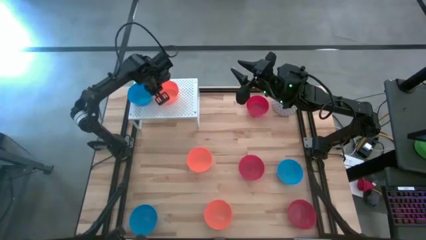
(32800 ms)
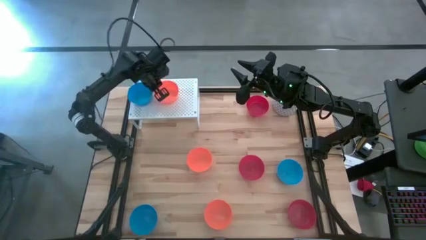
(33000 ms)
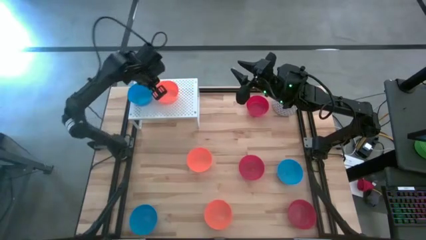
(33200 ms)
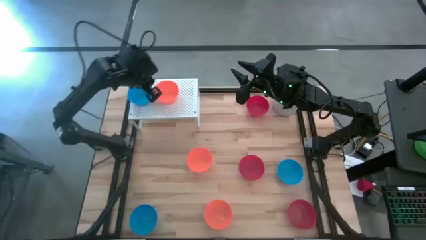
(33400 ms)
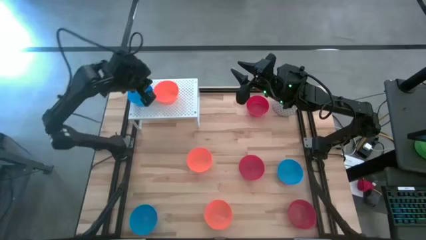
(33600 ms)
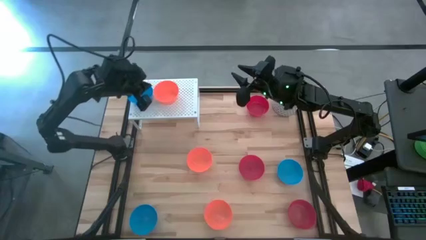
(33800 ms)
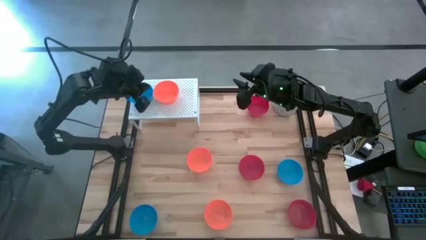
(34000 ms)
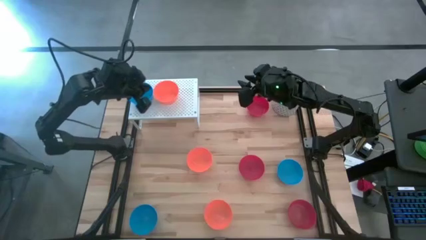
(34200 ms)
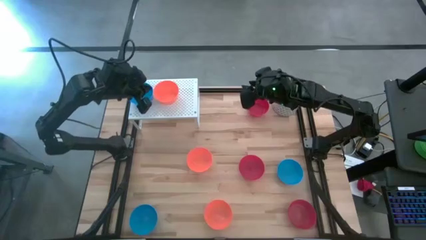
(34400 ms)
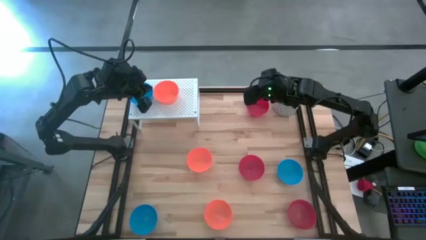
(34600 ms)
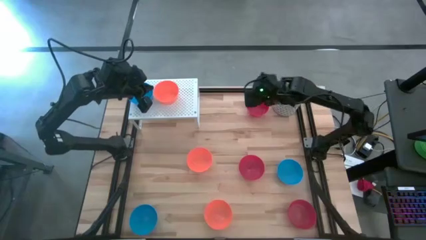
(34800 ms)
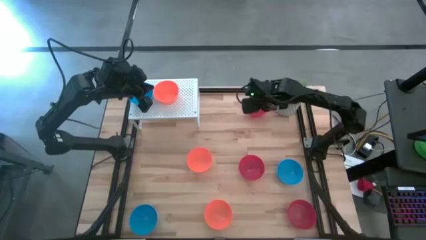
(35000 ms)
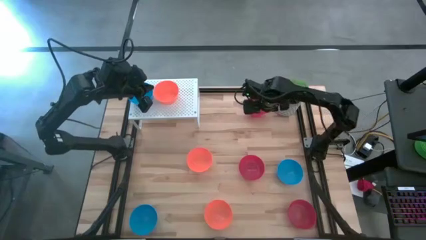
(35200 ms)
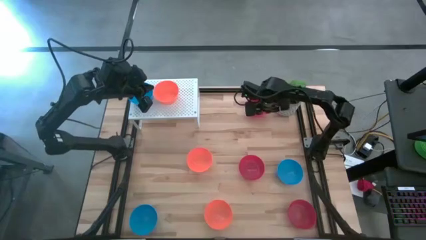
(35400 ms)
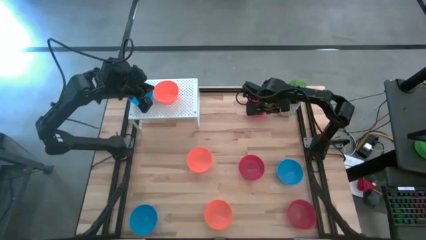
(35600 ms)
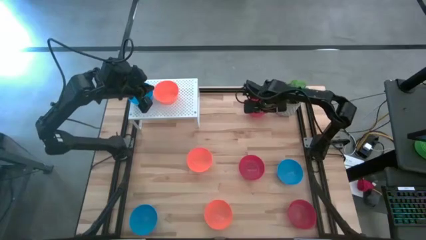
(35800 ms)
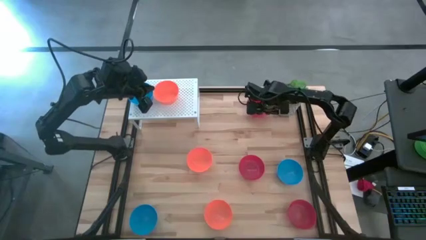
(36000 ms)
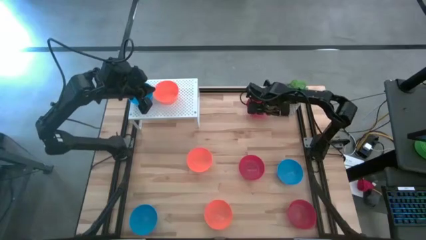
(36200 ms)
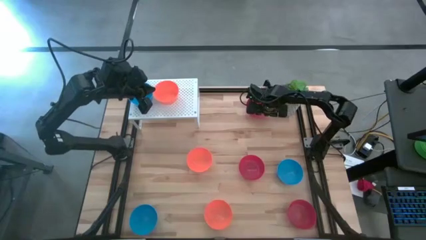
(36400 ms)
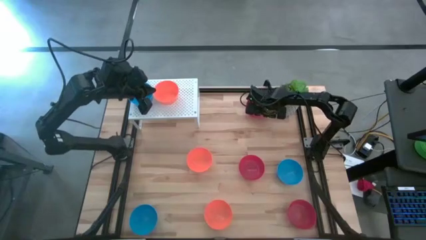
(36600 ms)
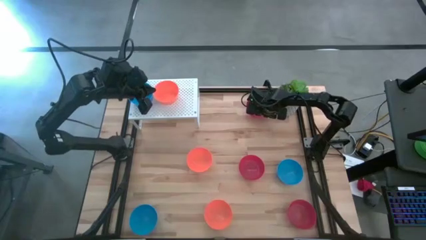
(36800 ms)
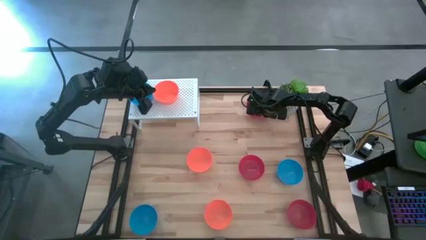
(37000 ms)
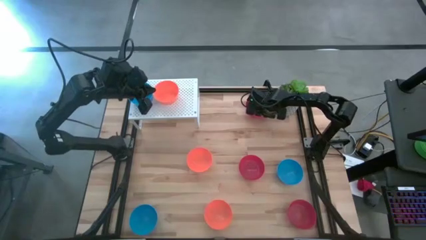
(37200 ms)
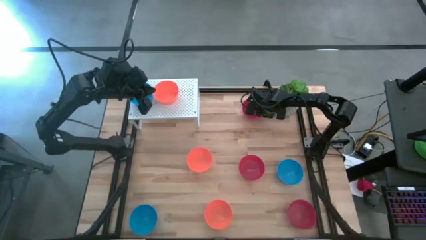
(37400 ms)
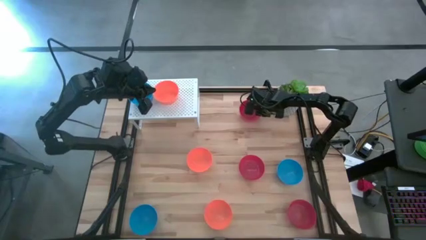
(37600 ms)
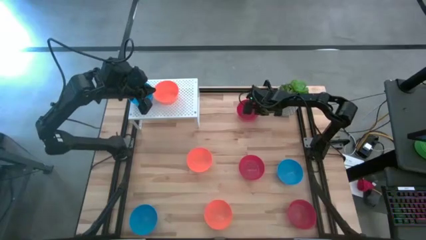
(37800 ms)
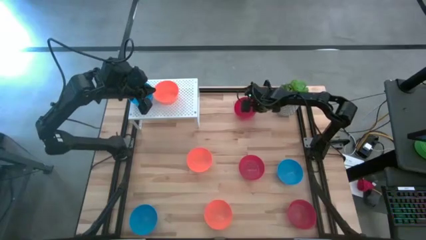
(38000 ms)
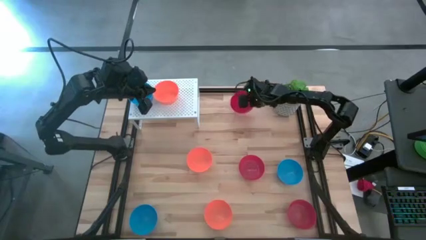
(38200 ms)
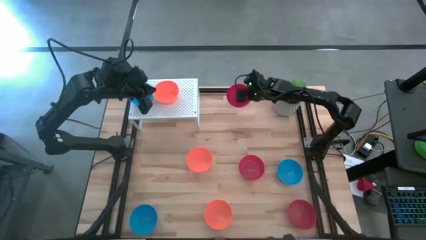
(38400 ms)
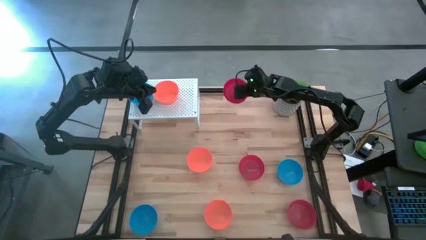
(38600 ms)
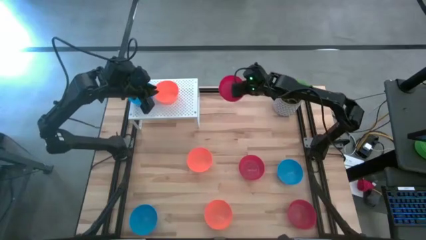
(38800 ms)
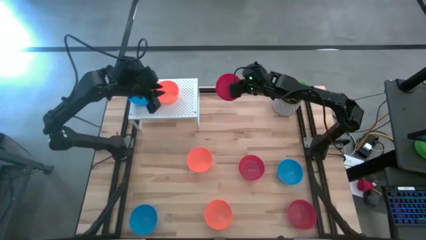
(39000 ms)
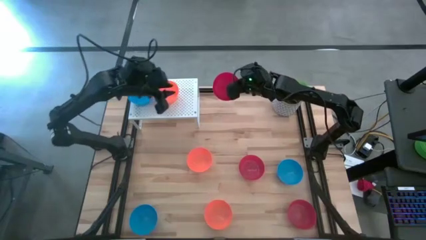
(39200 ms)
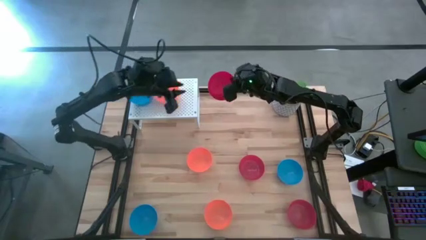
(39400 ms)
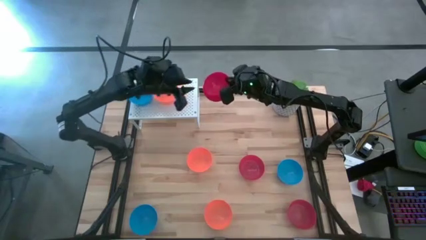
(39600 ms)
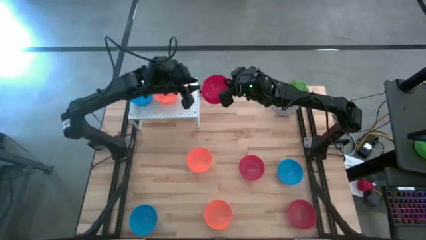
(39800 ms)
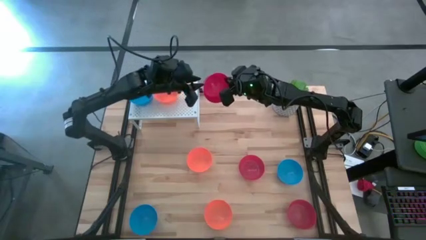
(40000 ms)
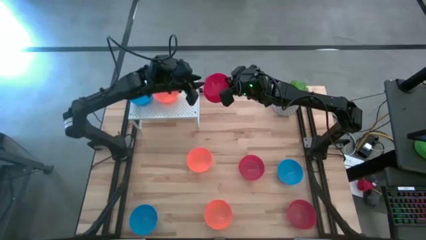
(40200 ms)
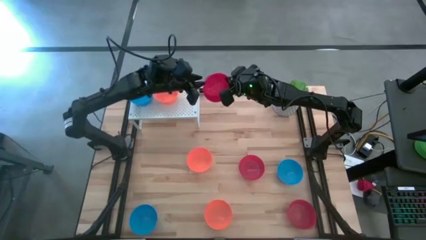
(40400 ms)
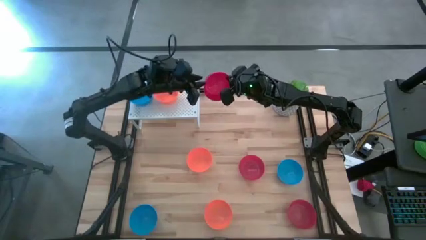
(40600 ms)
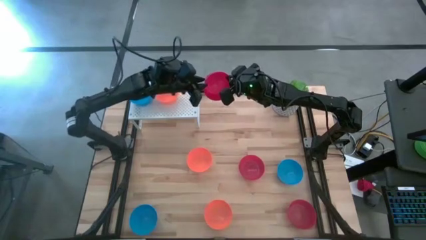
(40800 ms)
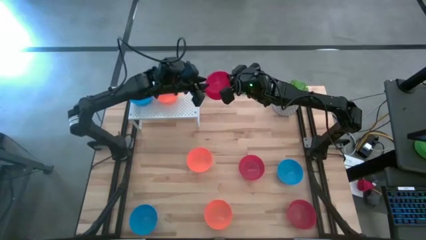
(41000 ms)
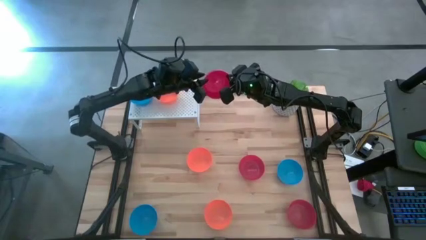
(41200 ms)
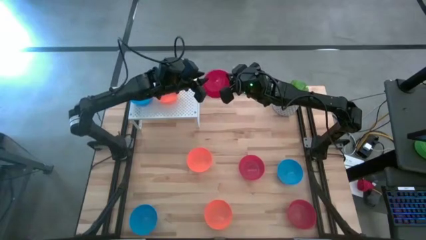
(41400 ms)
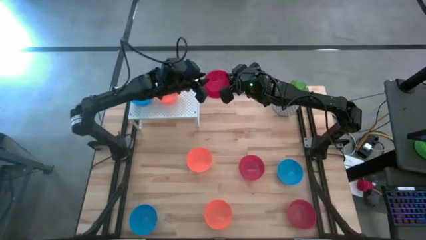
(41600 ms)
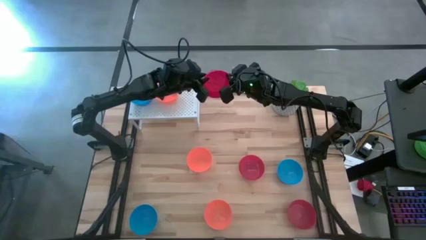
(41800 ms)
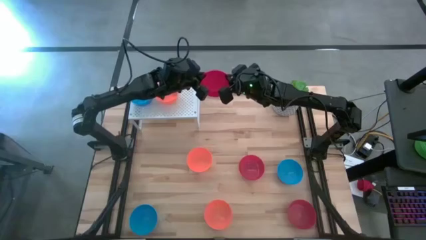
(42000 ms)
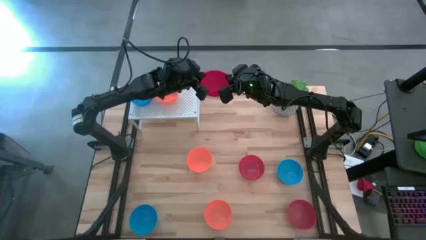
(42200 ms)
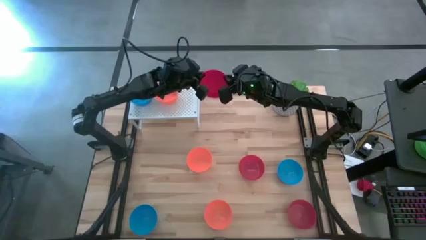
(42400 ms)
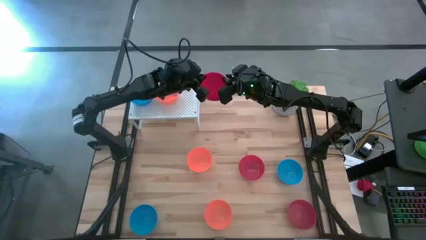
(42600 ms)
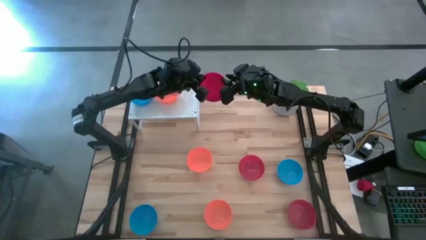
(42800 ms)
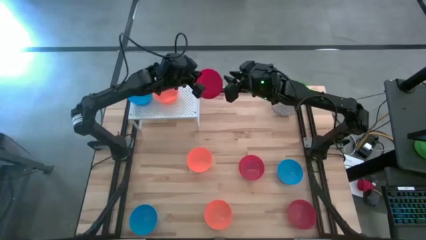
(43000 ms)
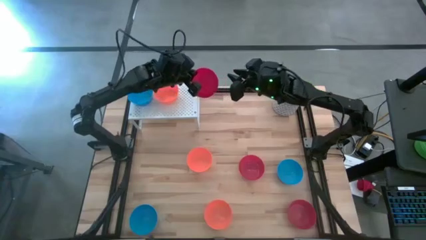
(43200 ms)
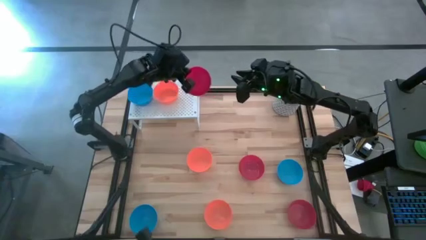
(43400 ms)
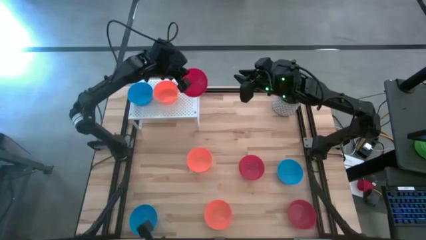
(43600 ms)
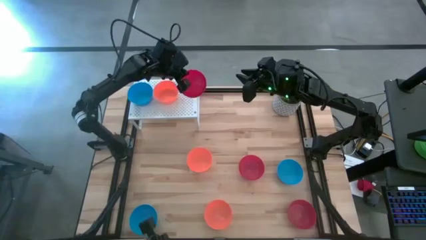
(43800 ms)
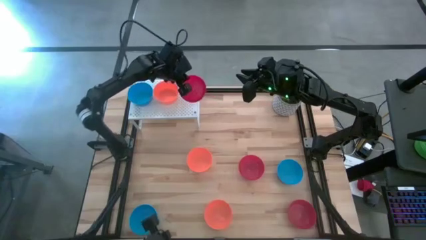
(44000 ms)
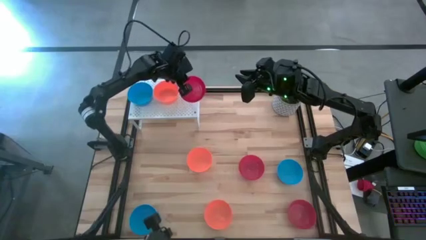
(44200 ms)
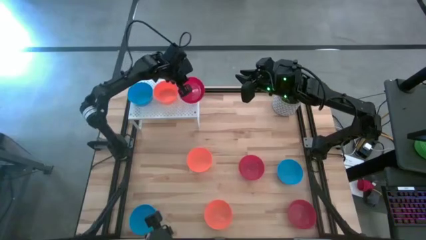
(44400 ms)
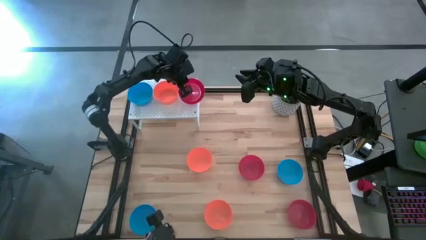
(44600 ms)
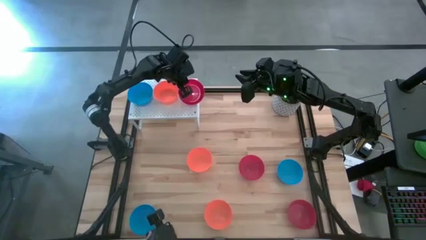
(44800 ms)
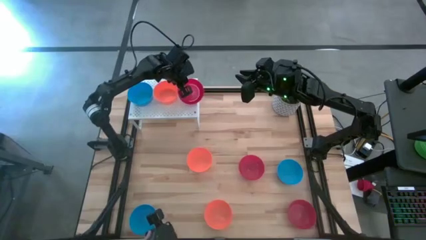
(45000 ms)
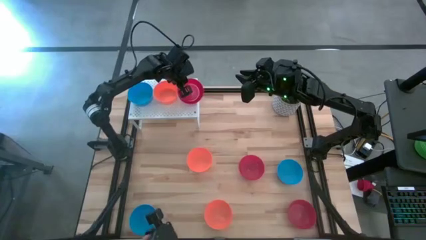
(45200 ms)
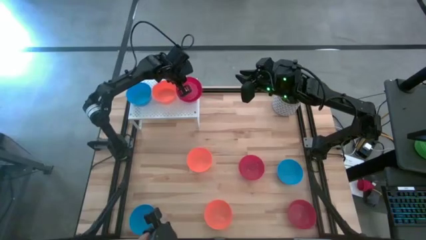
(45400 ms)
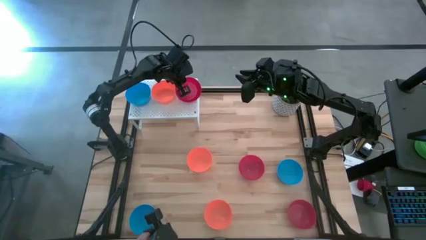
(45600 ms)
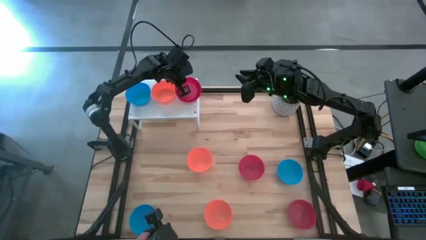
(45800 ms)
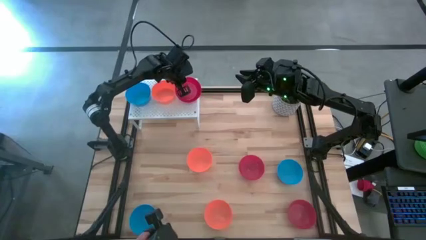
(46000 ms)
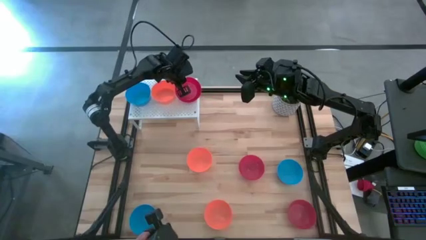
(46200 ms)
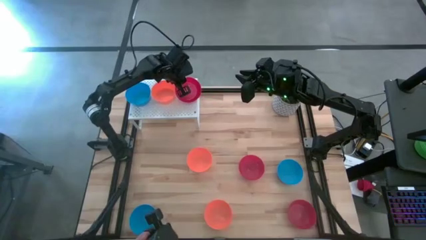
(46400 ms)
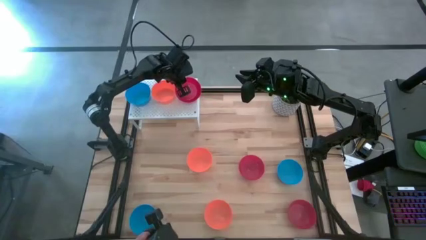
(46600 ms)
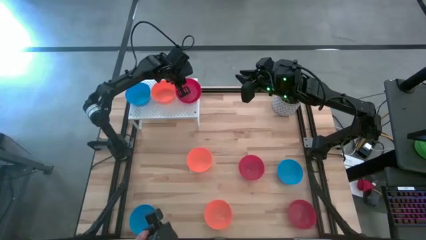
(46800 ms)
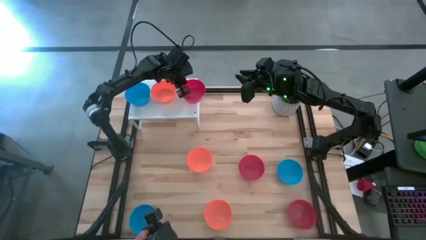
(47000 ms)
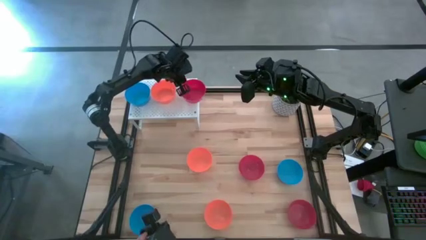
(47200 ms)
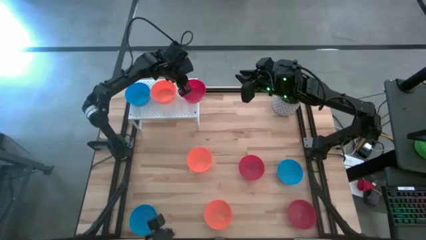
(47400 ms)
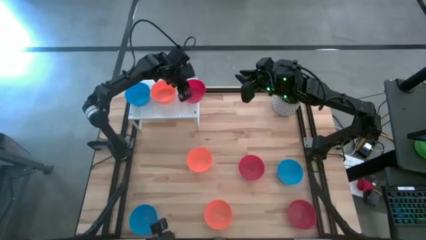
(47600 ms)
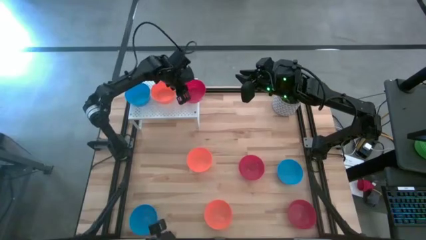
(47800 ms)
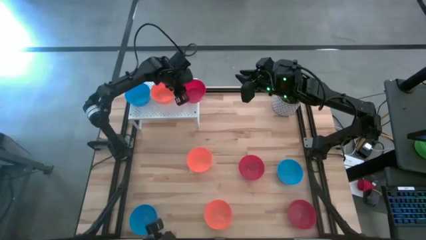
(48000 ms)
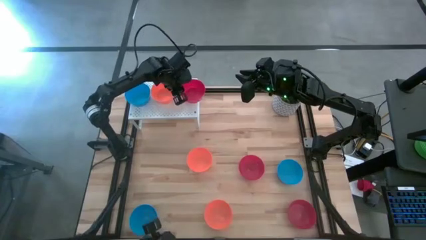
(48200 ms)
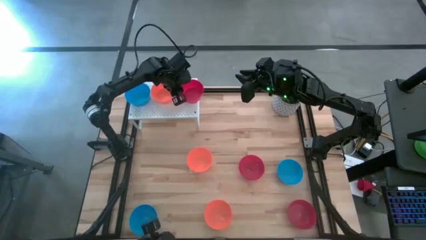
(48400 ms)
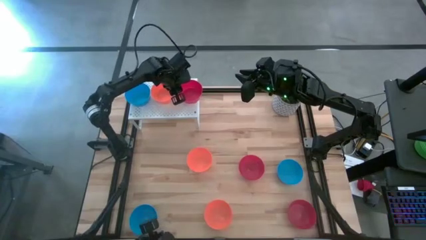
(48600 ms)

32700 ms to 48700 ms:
Task: Pick & Place Mini bowls
Put the top red bowl on the right side of the shelf
